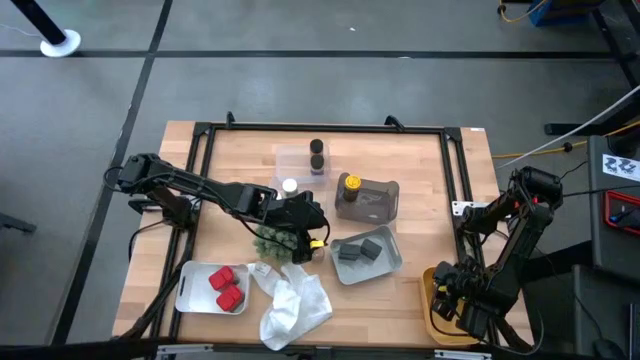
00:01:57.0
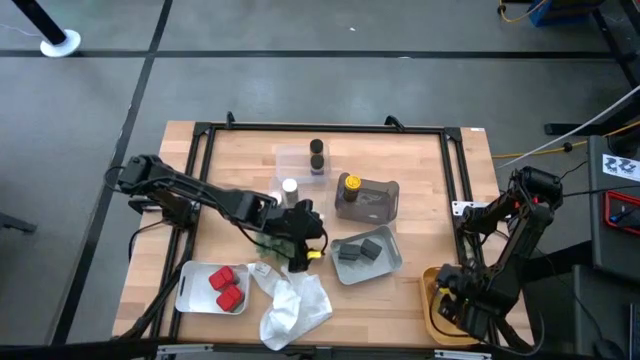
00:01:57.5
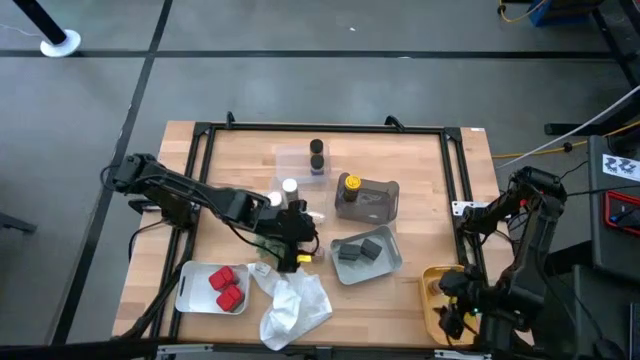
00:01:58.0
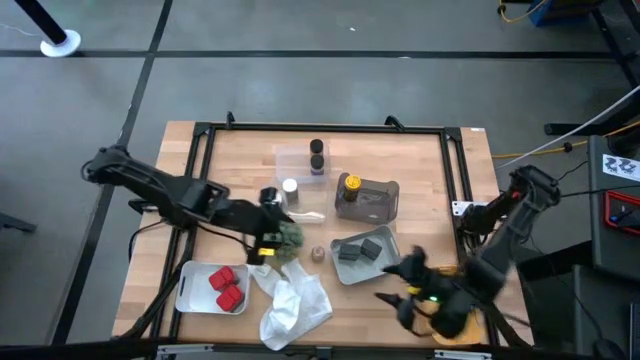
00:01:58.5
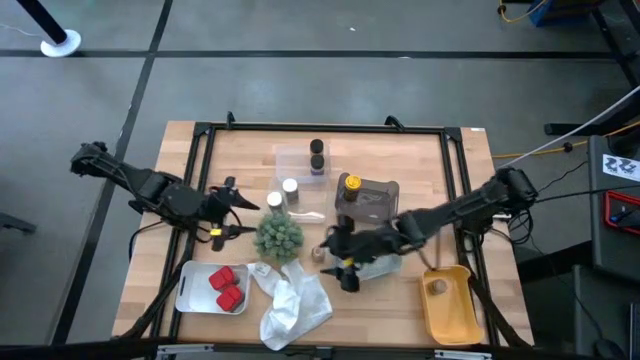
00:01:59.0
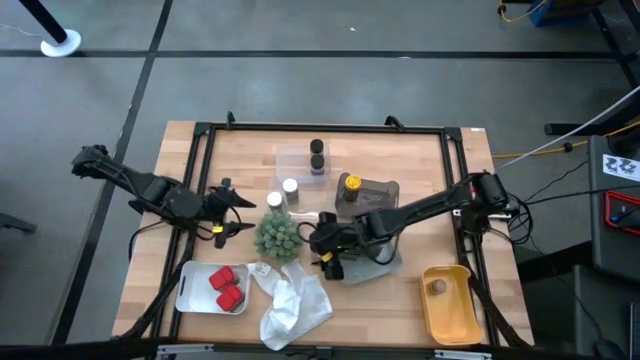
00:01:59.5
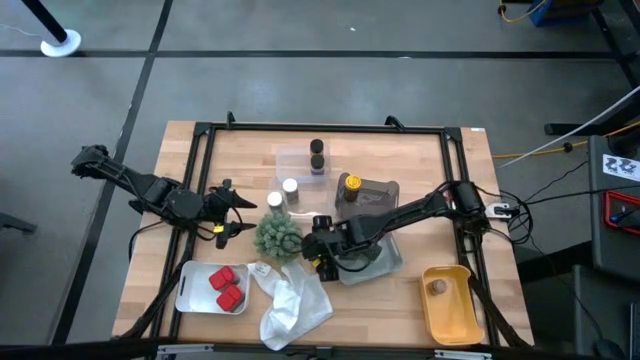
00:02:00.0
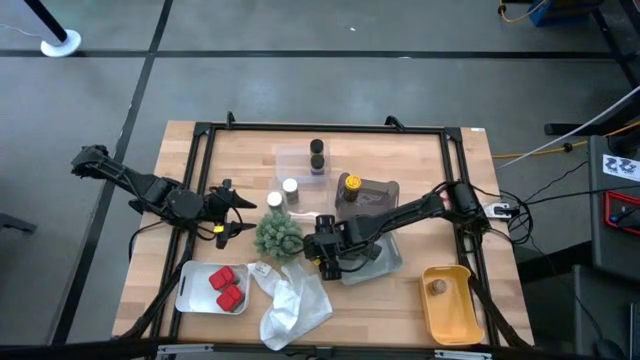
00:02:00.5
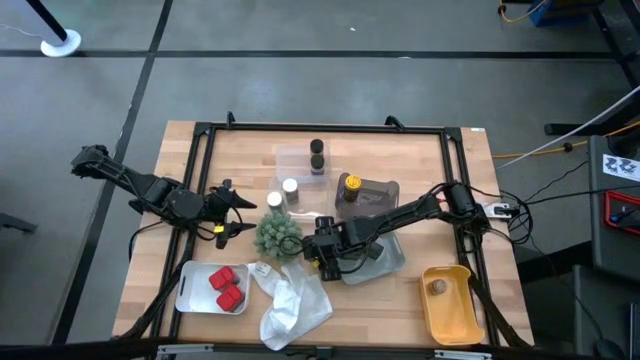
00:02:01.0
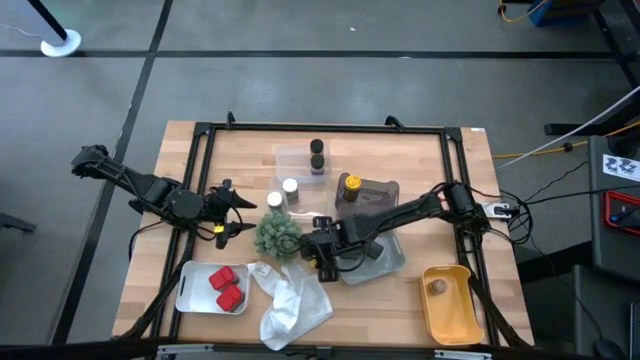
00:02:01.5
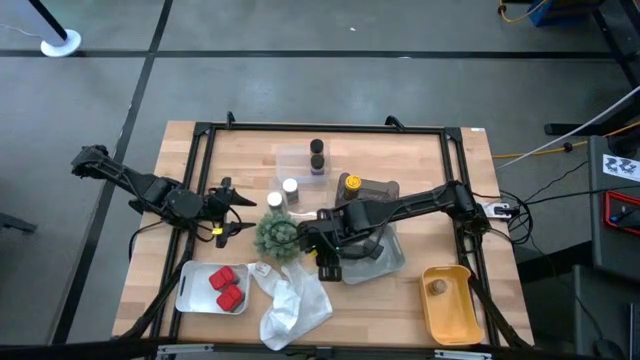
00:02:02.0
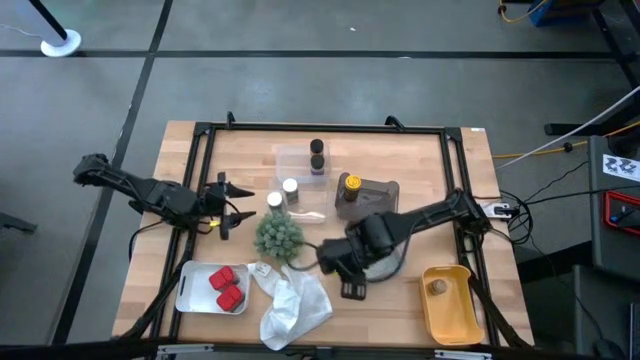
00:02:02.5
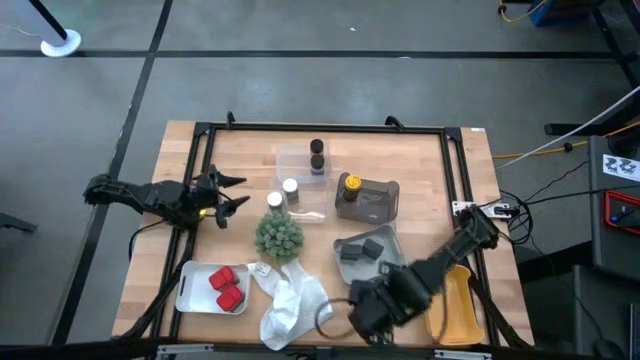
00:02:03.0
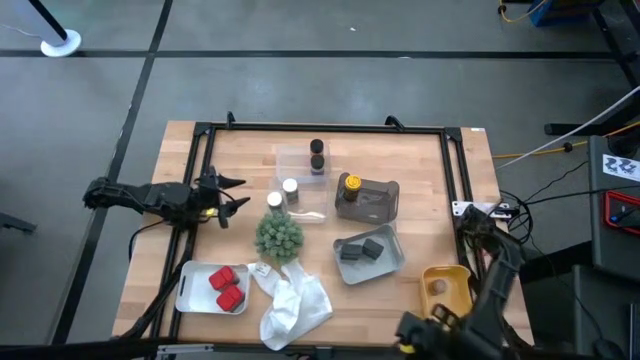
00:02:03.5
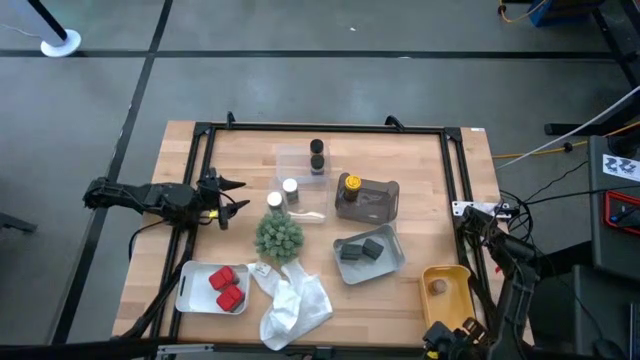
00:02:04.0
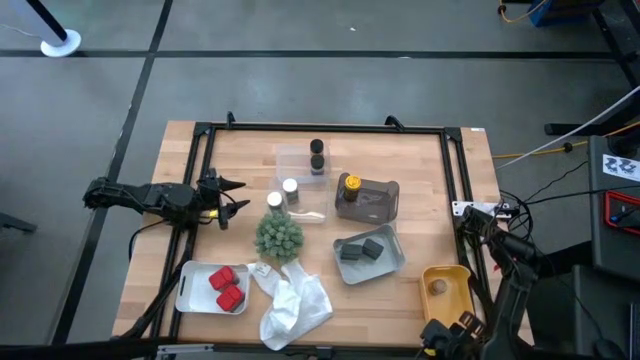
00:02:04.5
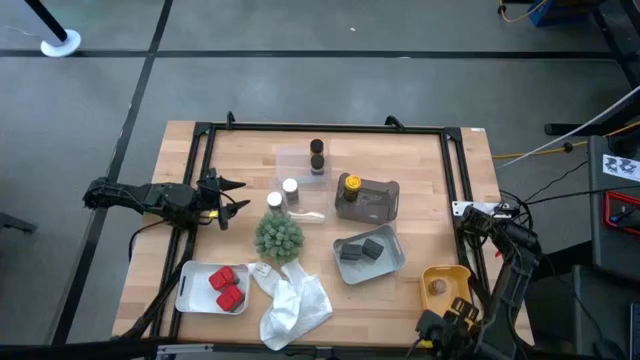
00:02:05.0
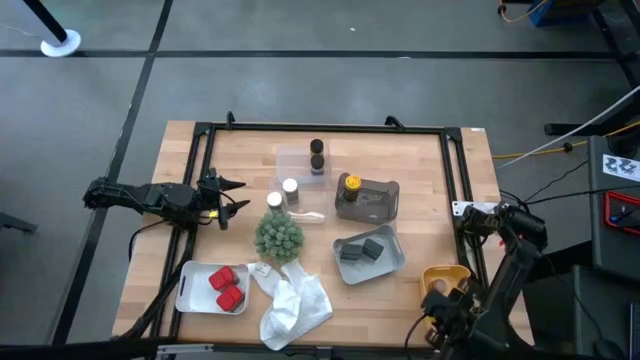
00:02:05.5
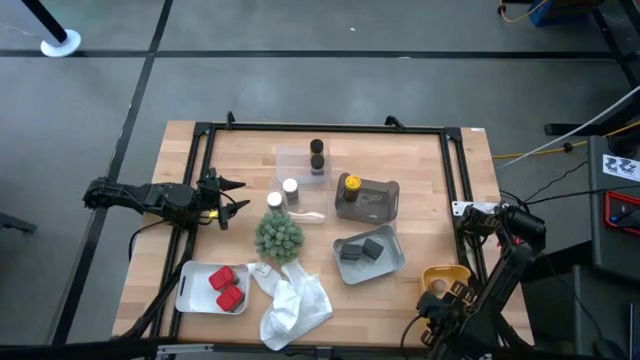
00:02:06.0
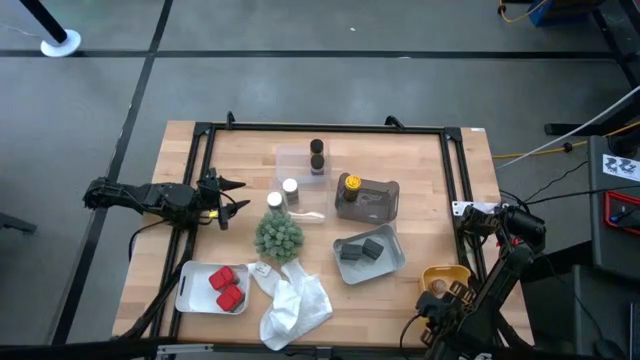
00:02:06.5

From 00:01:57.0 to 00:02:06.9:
Task: Sort spices by type
Put the brown seasoning bottle into the yellow bin

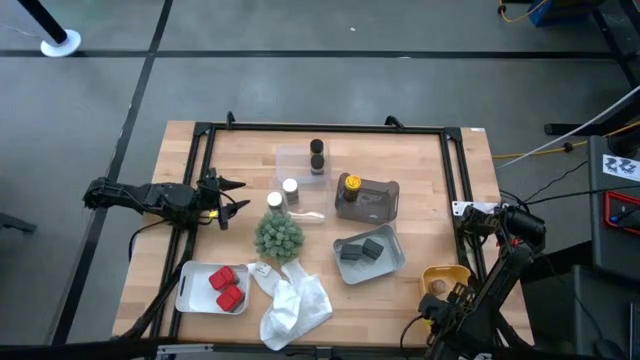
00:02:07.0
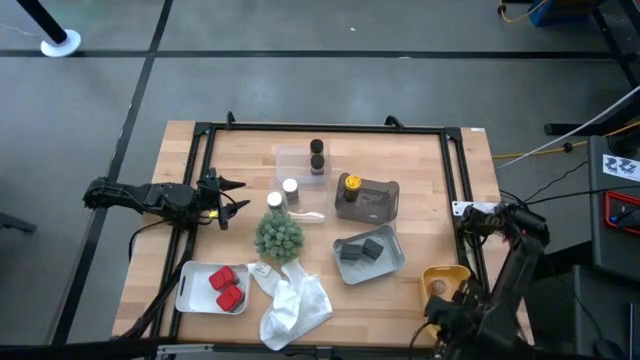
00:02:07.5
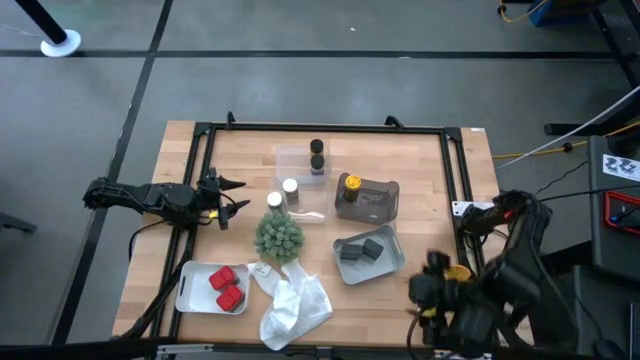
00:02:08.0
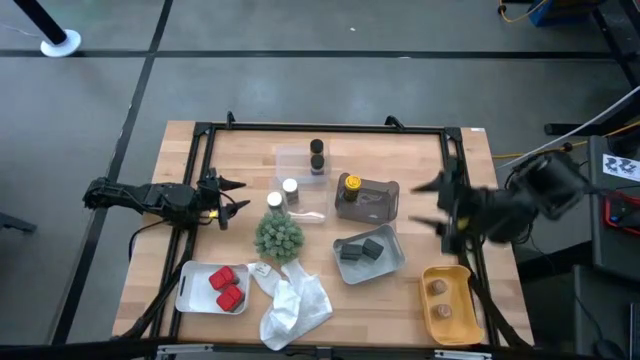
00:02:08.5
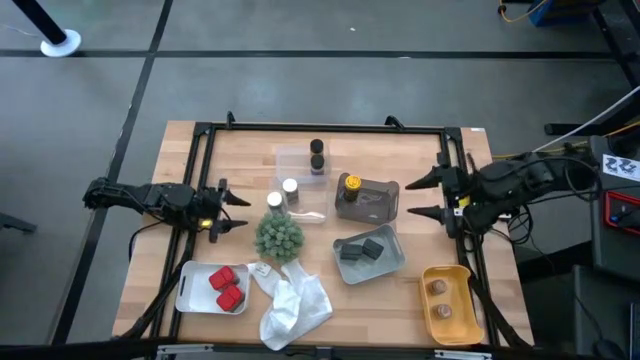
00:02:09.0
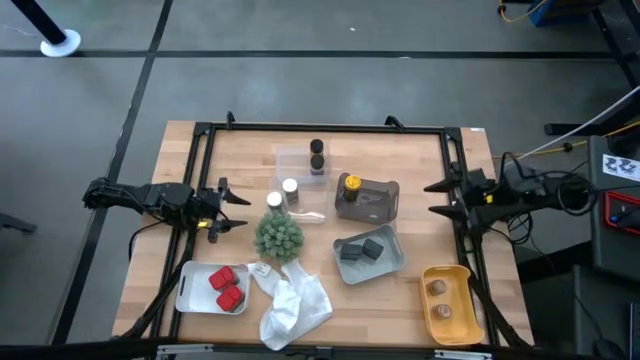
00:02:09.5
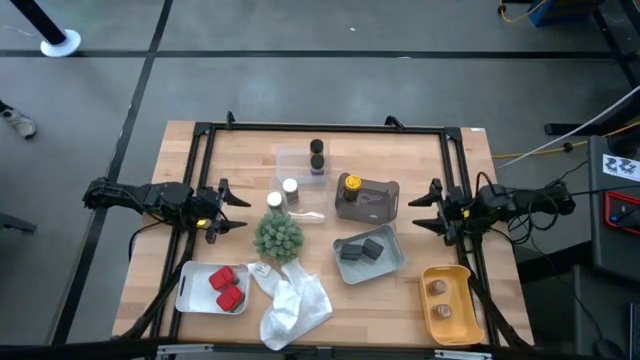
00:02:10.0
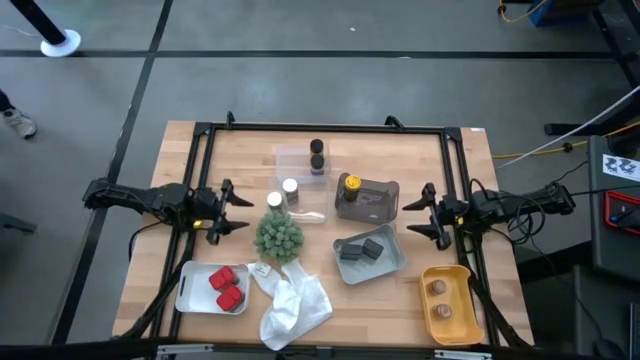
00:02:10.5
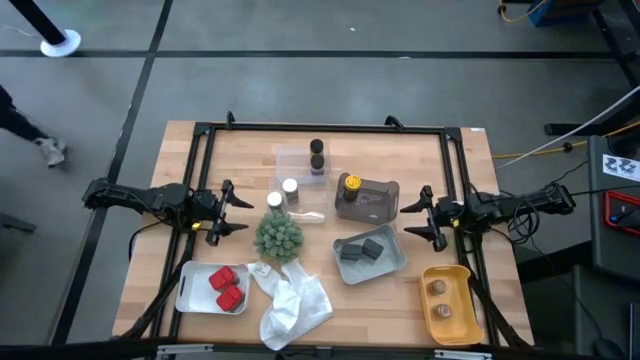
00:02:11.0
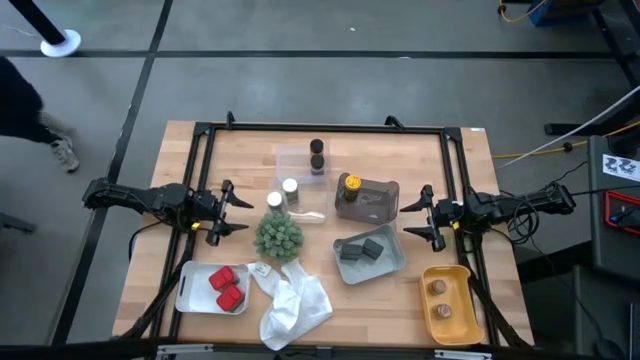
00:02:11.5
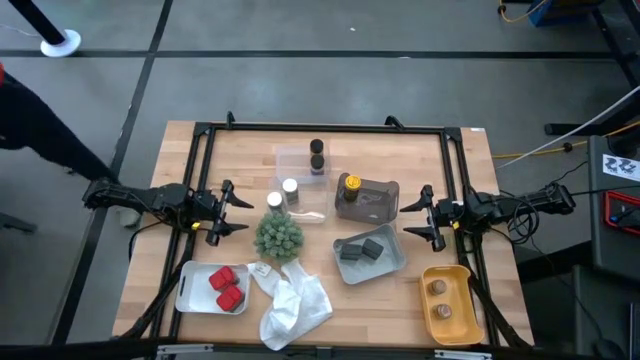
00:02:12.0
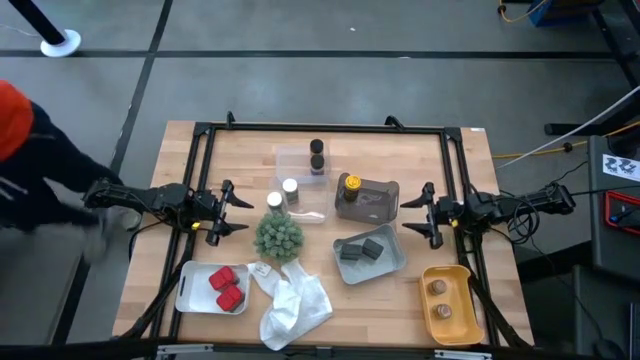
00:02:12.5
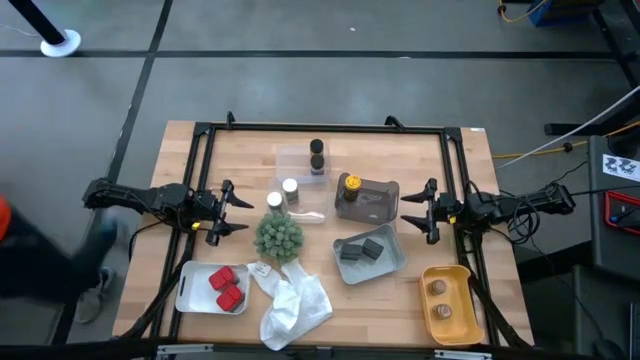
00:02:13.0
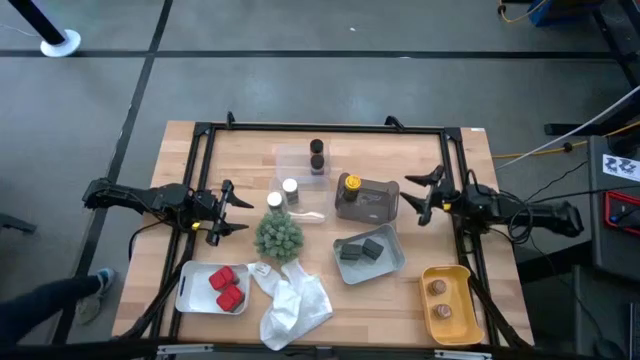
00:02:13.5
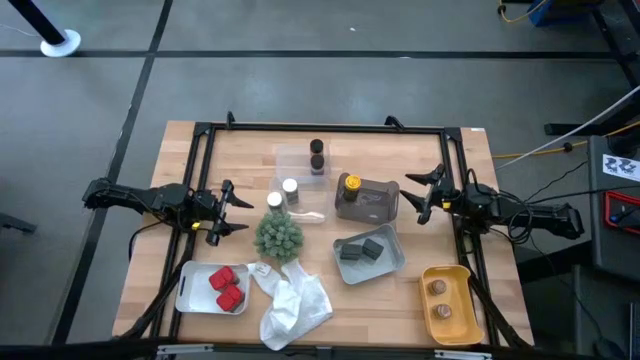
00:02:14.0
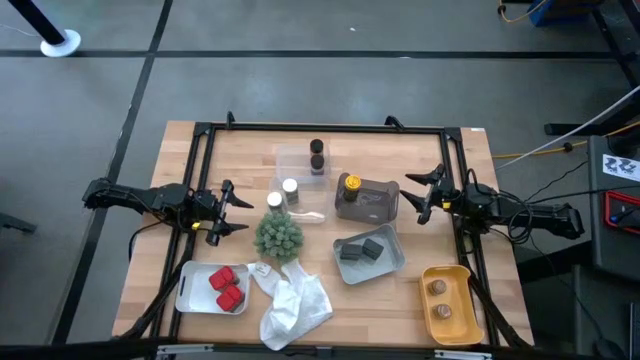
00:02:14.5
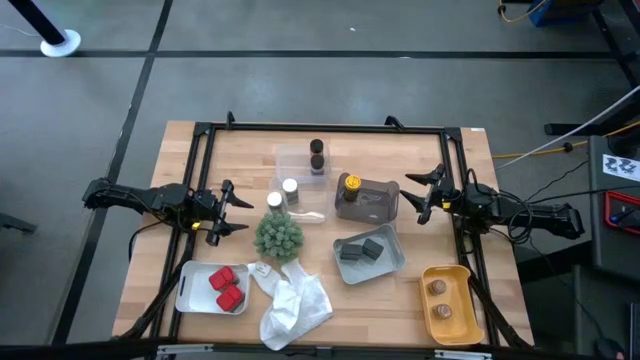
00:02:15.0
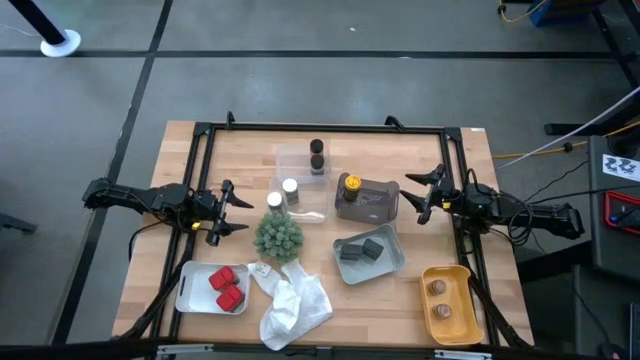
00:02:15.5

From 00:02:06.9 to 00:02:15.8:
Return to Home Position

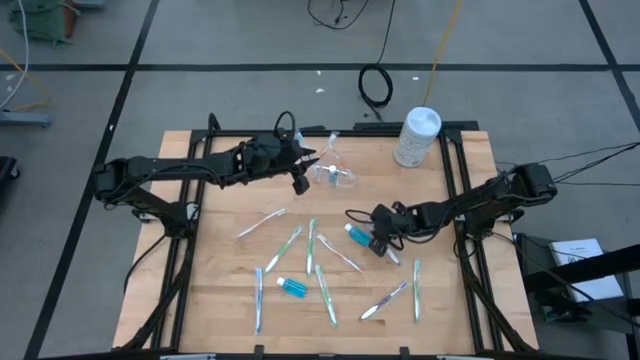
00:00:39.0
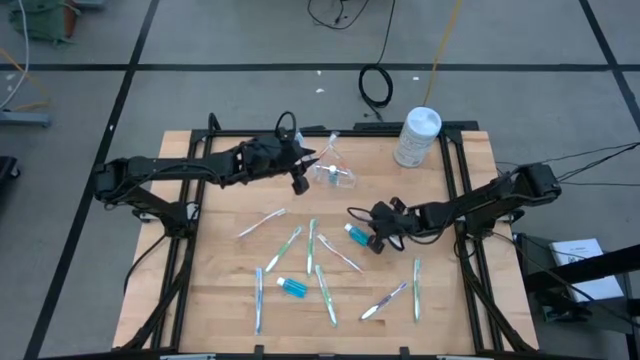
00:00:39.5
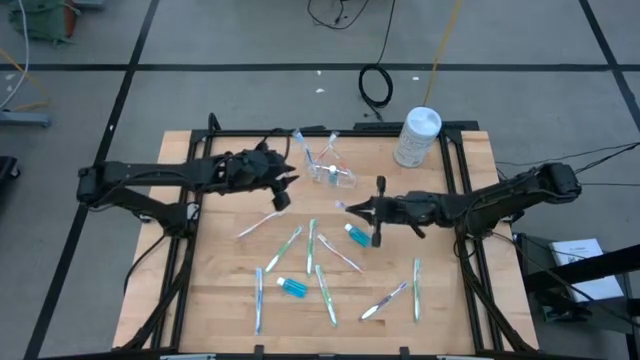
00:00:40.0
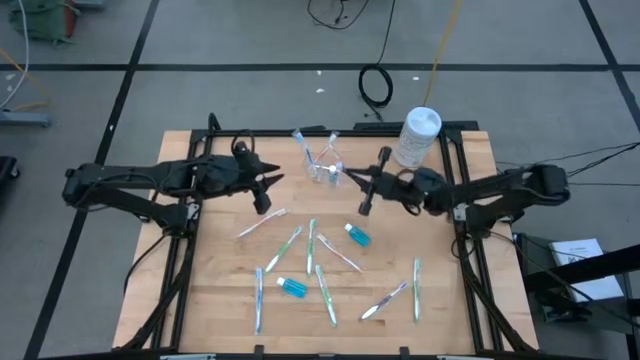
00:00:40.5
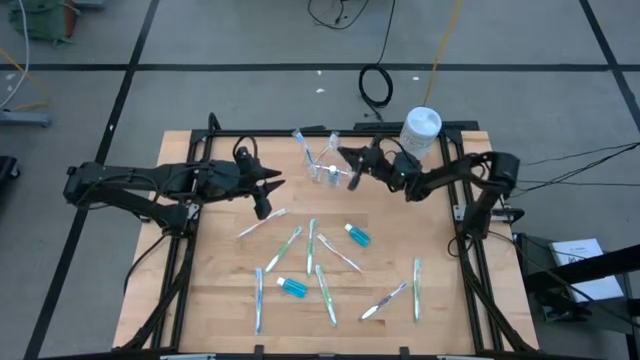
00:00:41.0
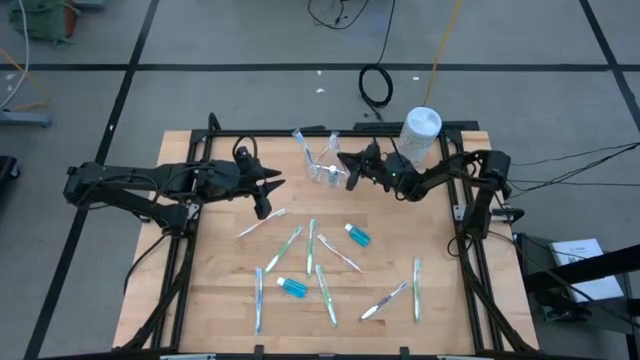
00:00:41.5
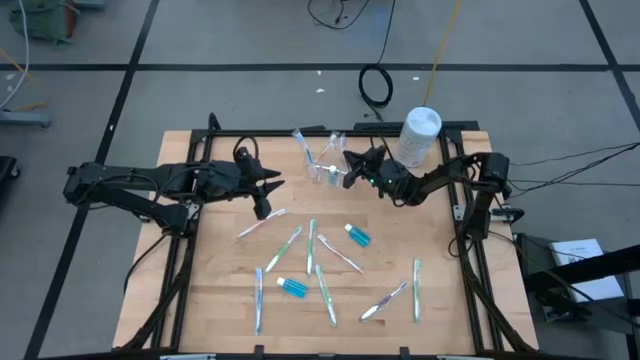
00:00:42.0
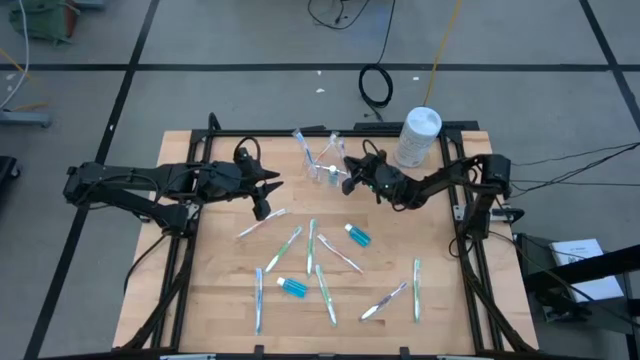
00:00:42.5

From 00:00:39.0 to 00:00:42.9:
Task: Pick & Place toothbrushing station
Put the purple toothbrush into the transparent organizer
